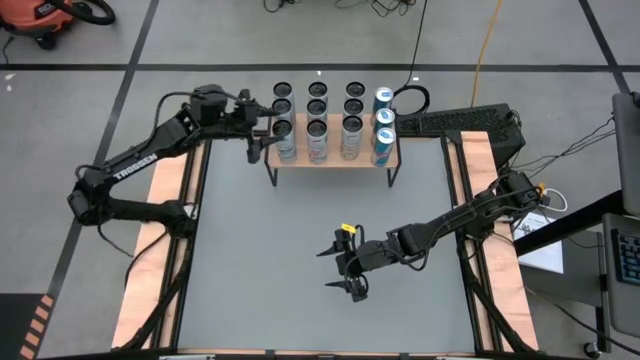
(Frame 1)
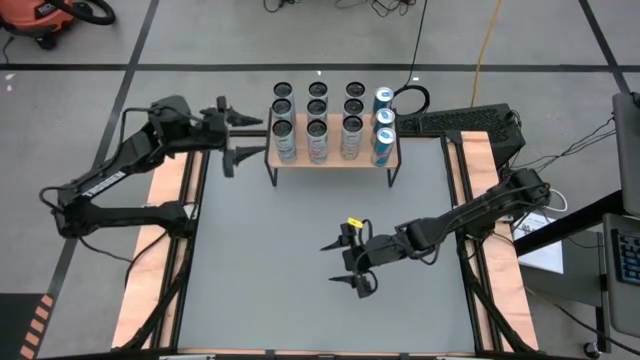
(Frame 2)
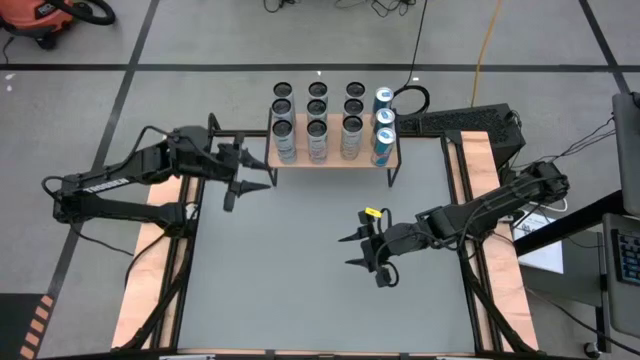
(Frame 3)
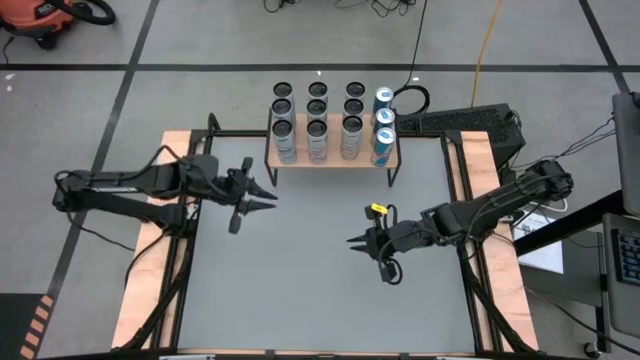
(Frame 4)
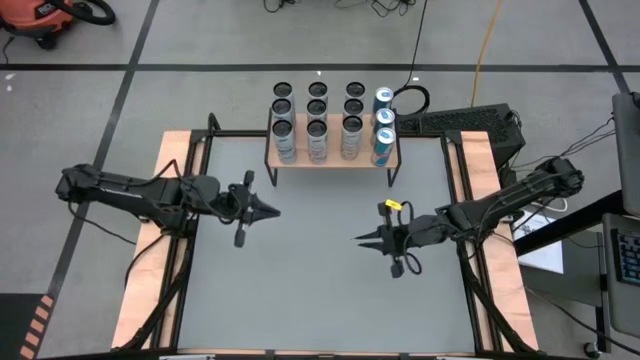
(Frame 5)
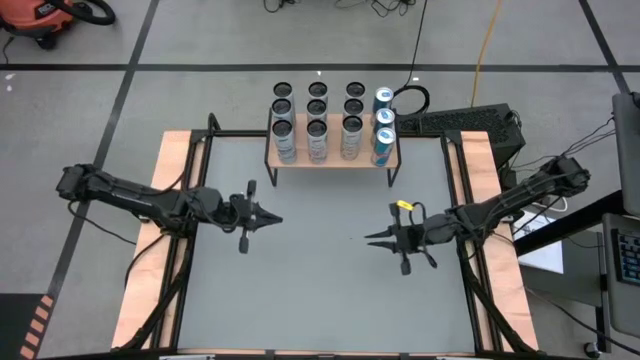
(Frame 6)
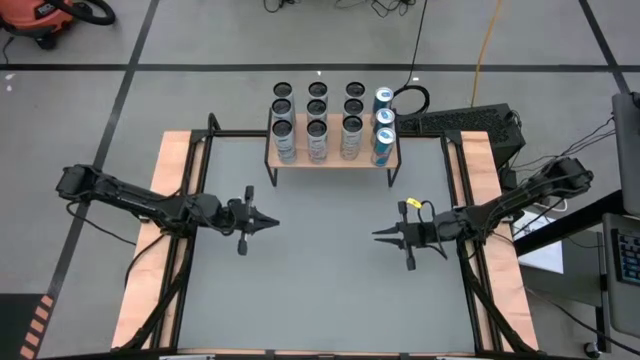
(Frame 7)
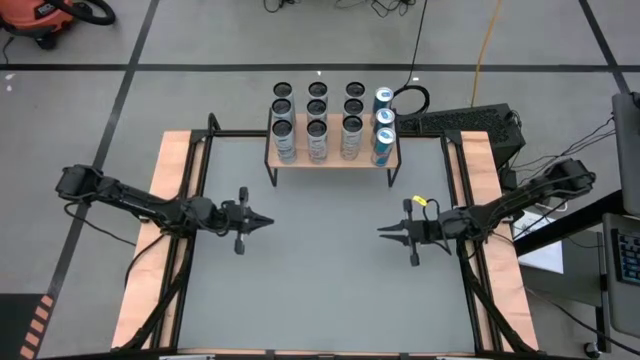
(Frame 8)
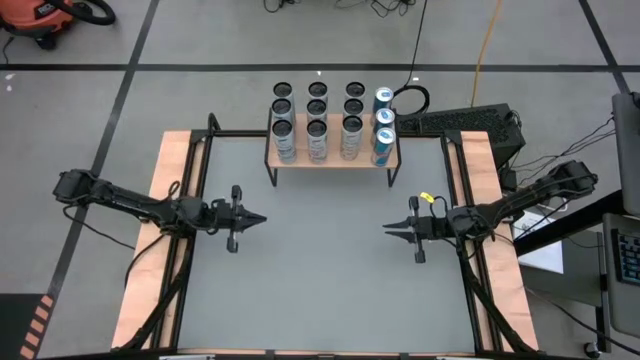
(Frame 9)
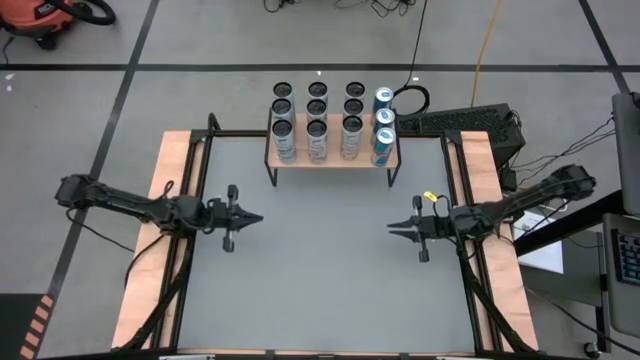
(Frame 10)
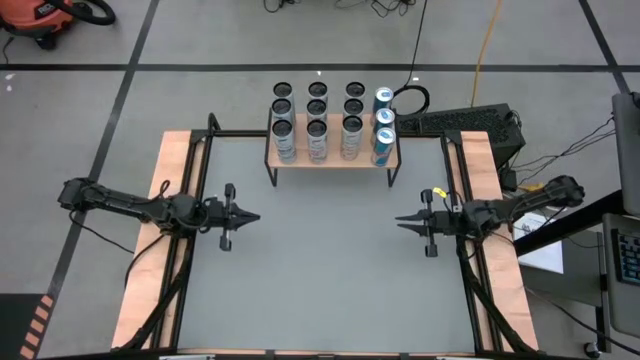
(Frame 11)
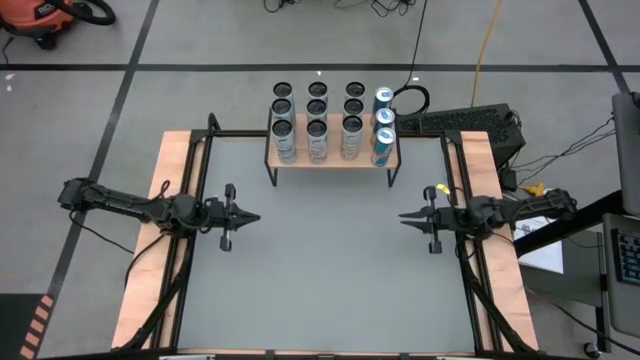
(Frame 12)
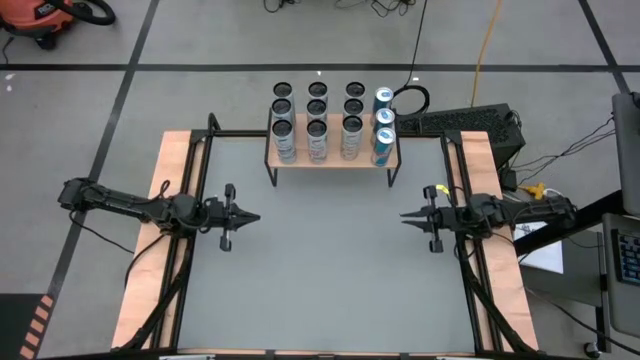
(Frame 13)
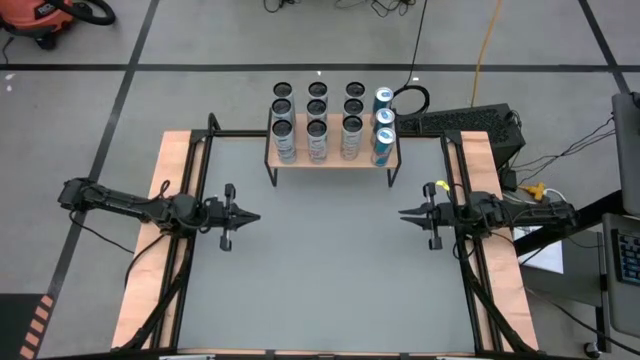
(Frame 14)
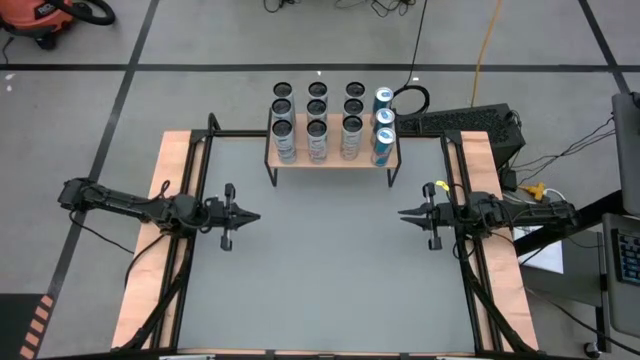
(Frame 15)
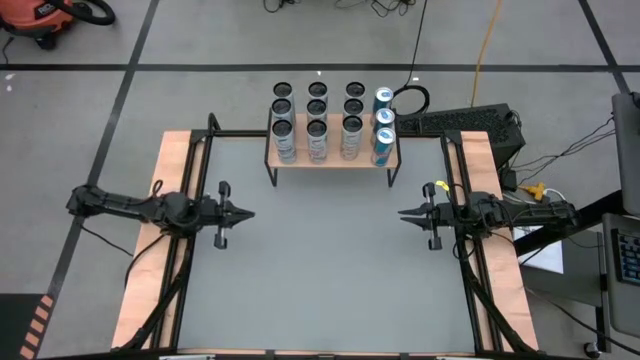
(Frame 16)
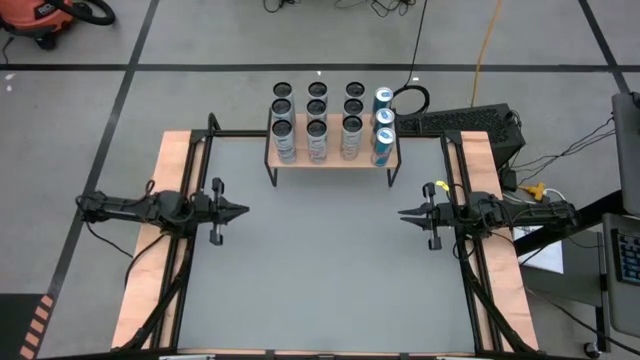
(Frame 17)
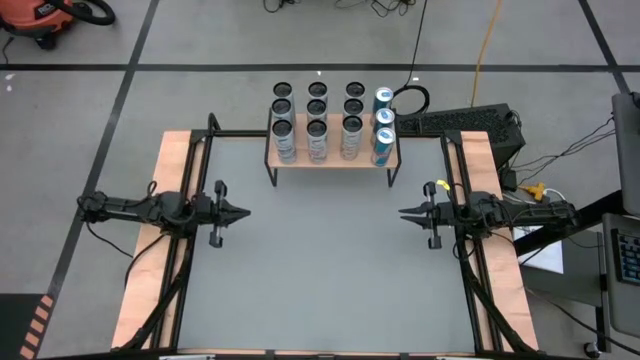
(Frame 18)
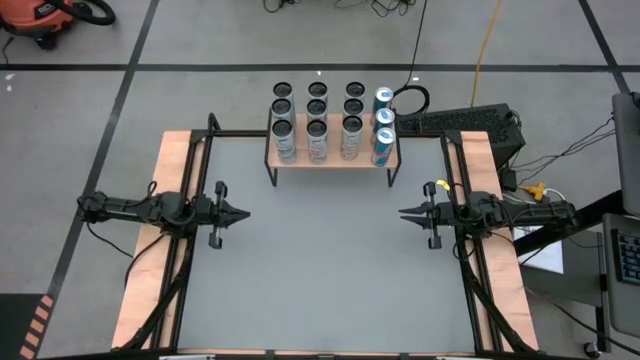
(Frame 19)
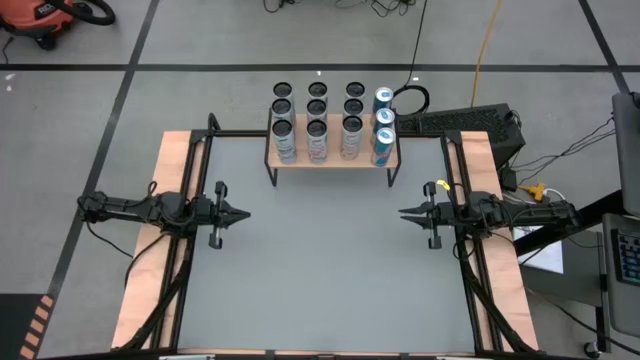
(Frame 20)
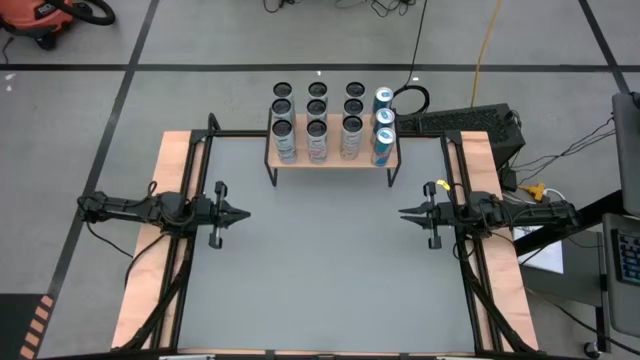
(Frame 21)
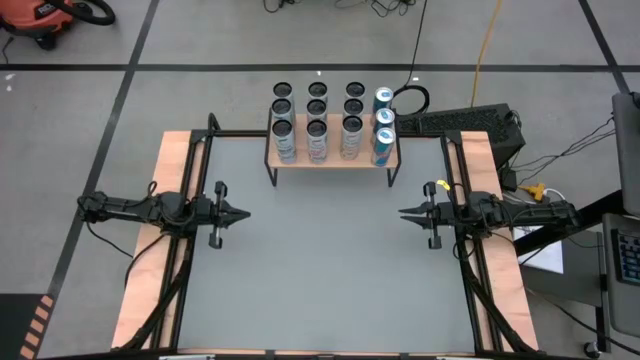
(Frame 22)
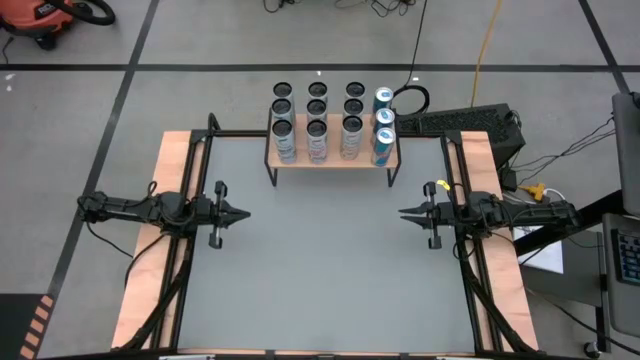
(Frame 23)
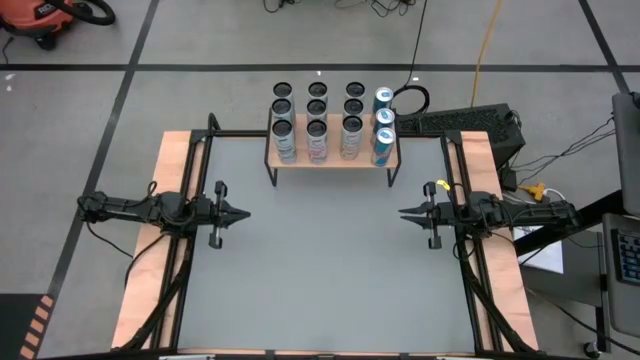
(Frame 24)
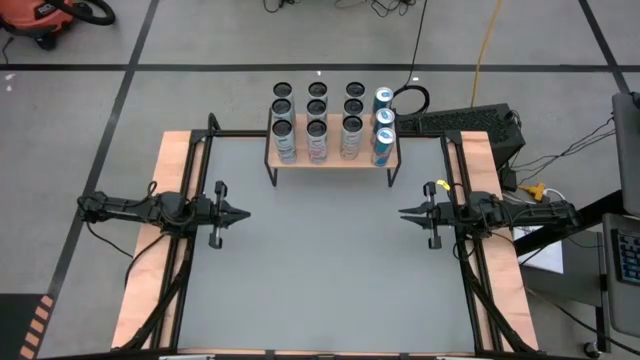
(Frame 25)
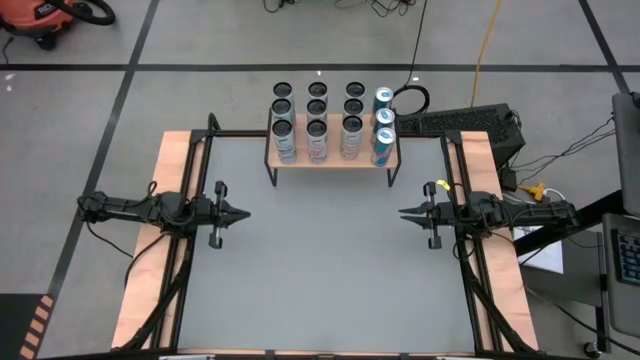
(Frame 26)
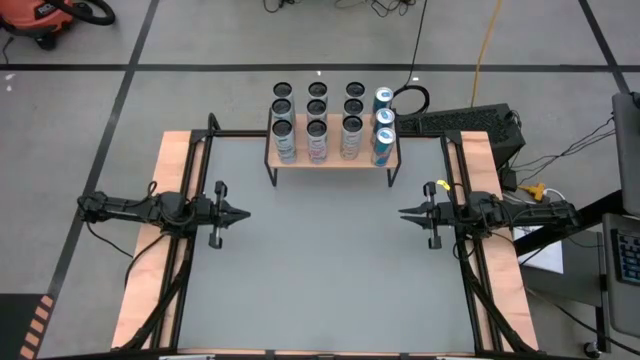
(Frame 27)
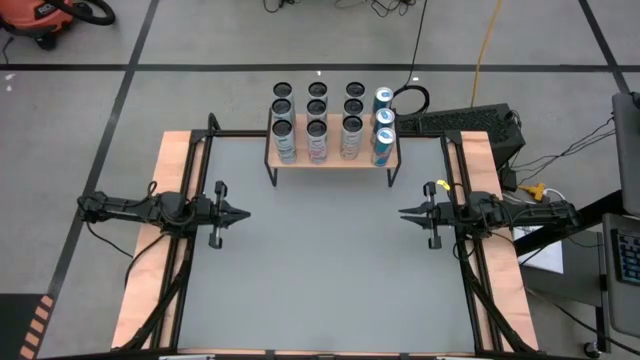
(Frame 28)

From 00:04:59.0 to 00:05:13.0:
Task: Place canned beverage on shelf
Return to Home Position

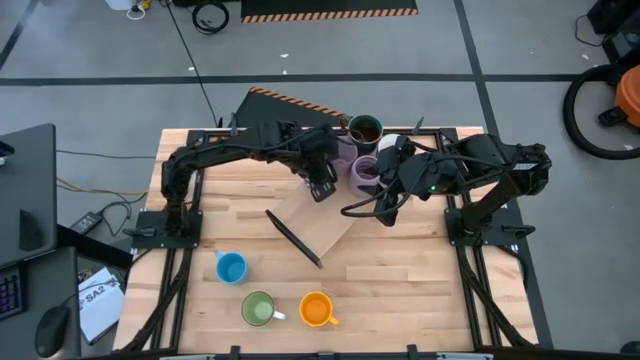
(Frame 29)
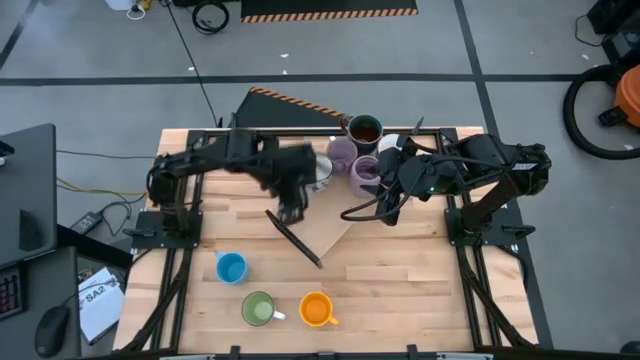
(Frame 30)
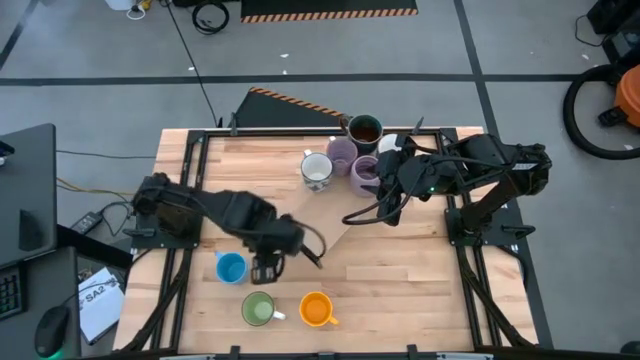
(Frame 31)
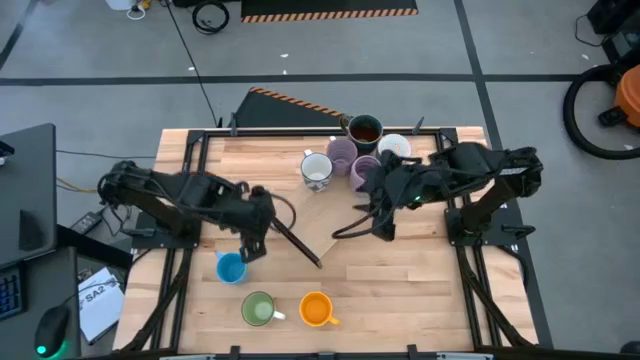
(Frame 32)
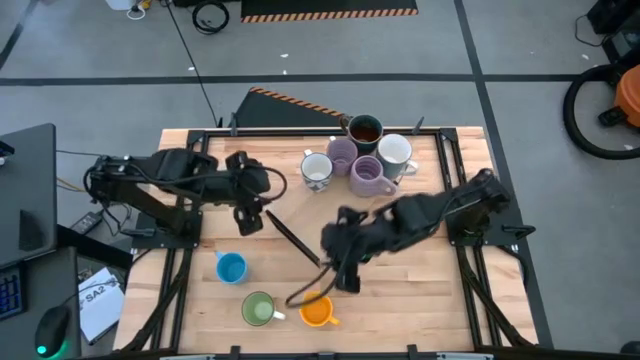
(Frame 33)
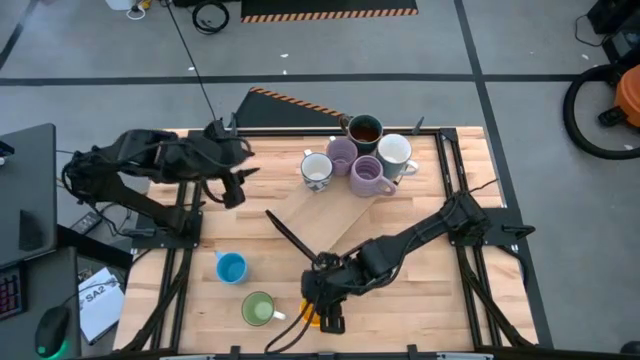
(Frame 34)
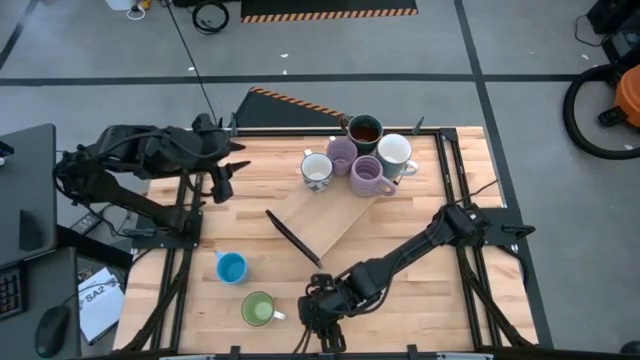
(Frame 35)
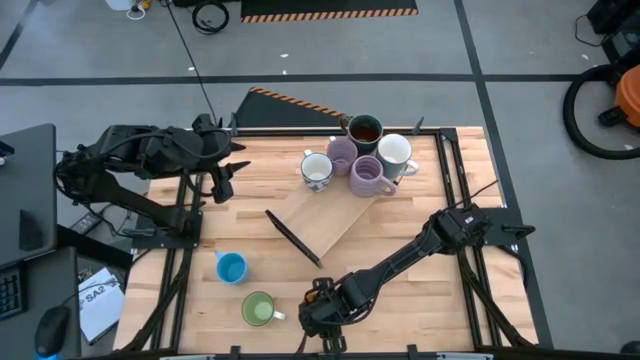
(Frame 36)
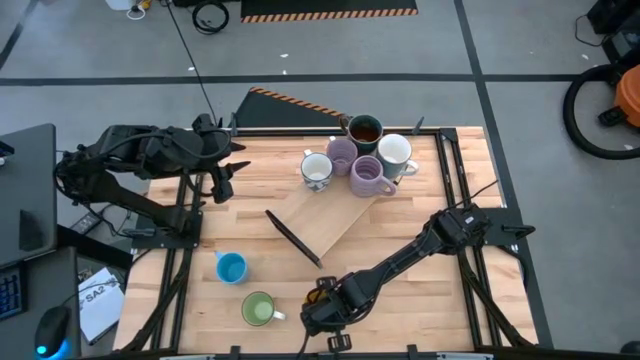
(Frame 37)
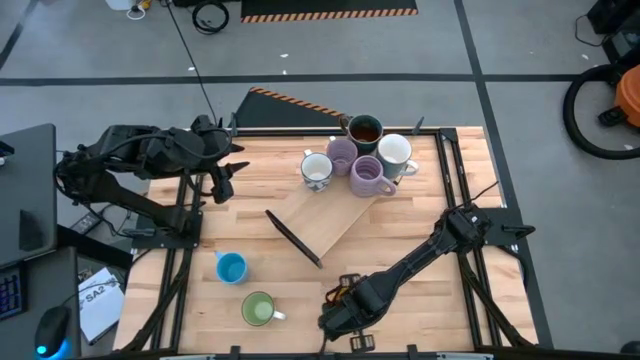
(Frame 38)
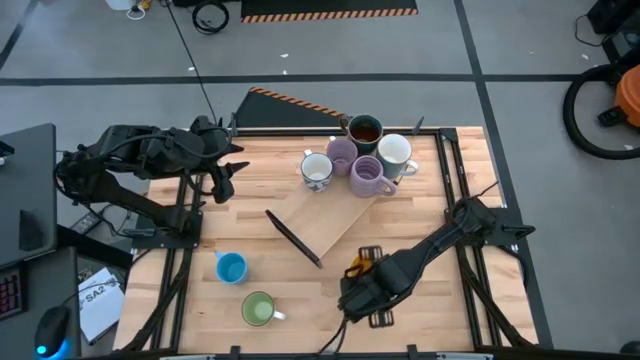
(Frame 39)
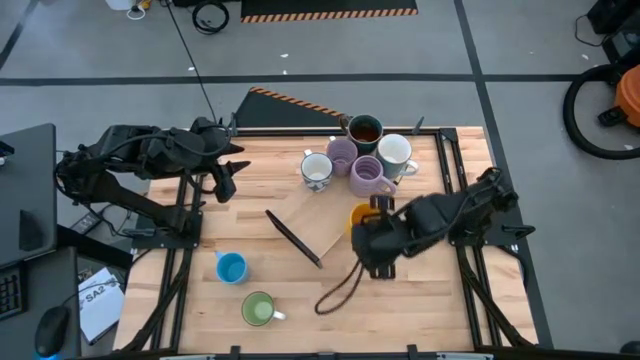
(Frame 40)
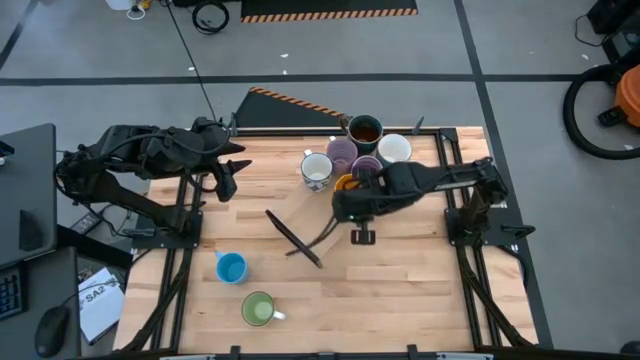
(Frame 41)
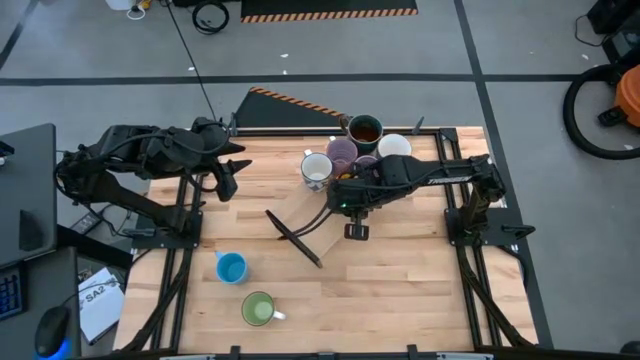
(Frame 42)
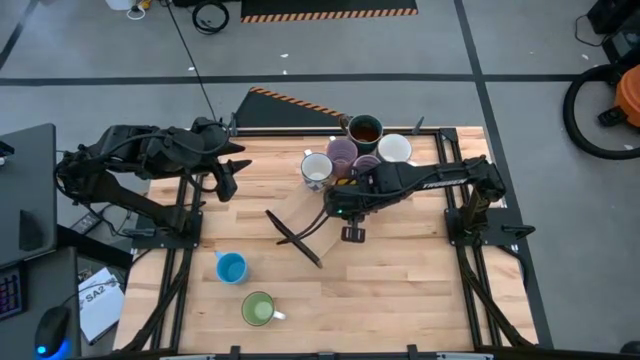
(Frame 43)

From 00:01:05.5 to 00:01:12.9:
Task: Place coffee mugs
Put the yellow mug on the shelf
